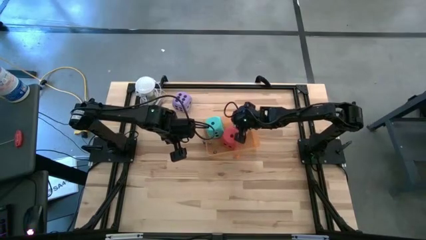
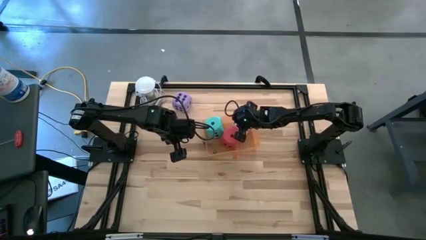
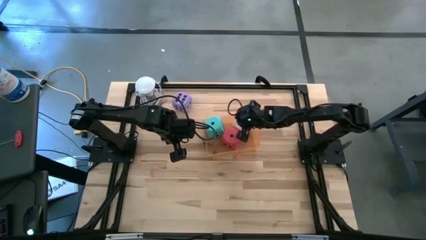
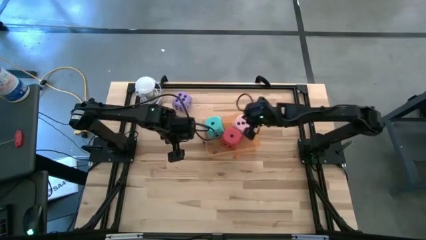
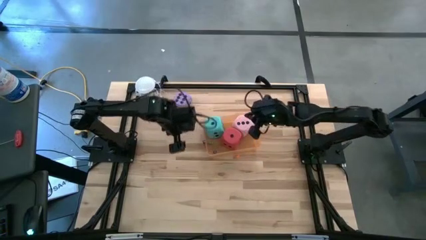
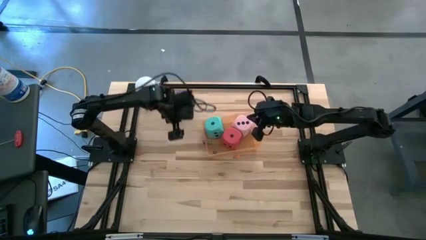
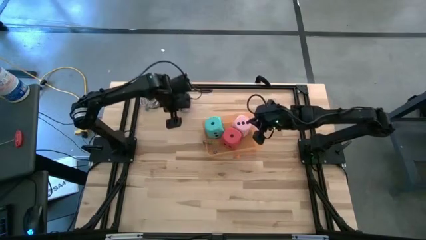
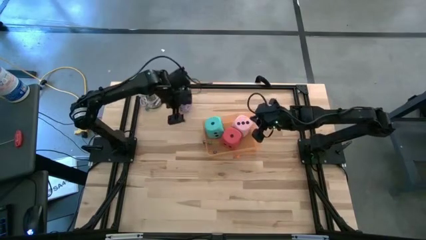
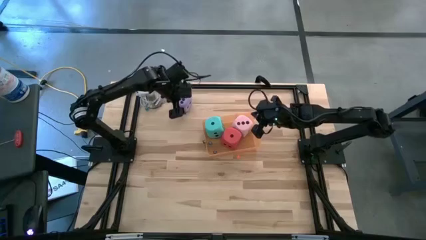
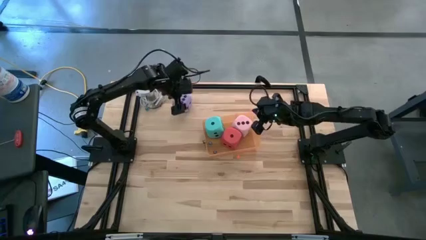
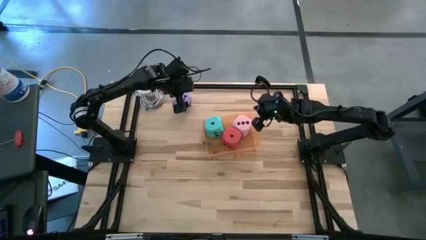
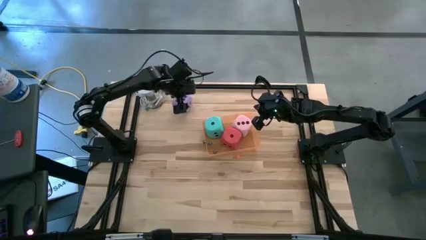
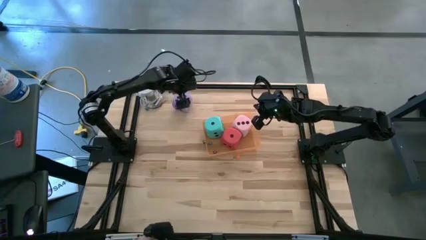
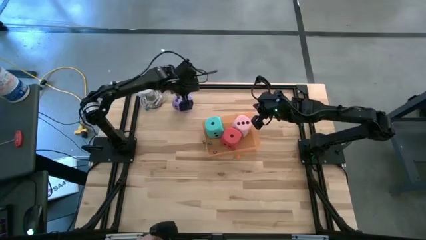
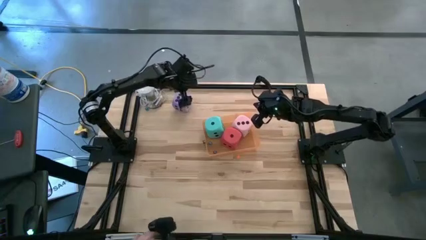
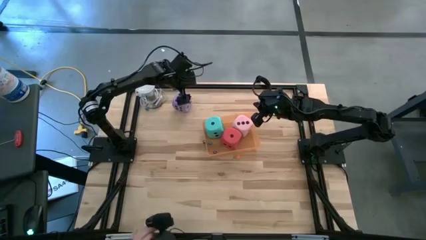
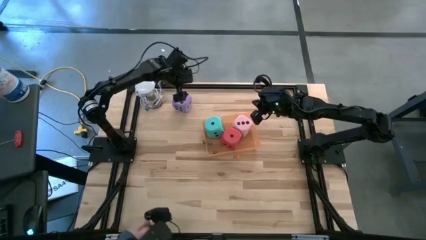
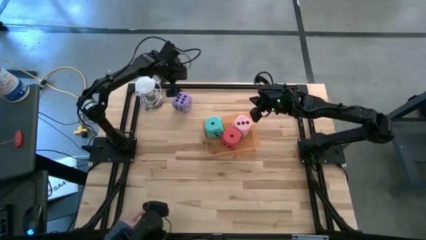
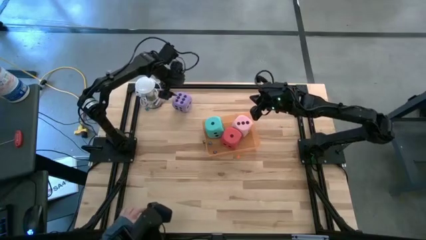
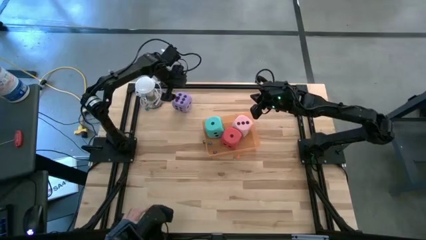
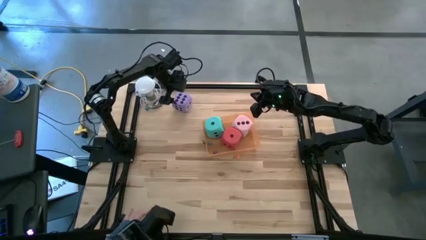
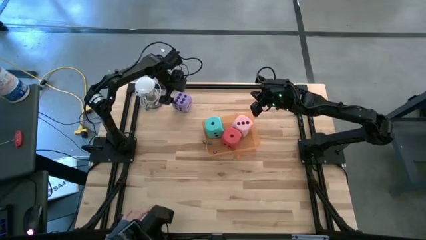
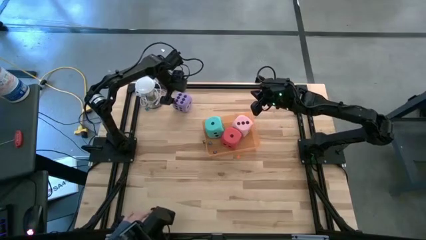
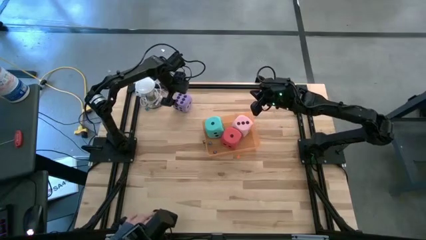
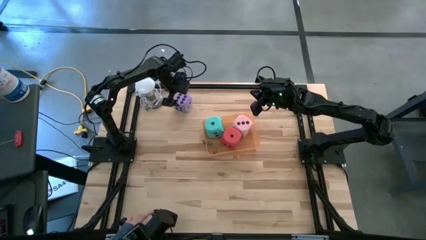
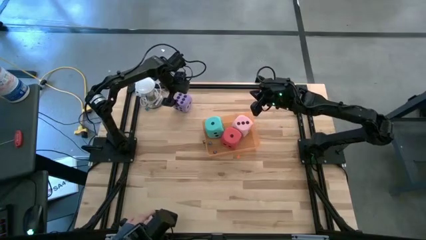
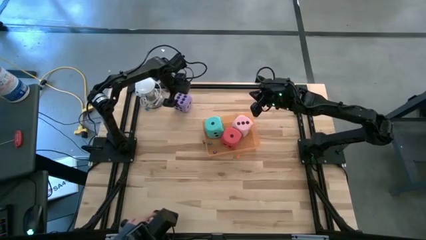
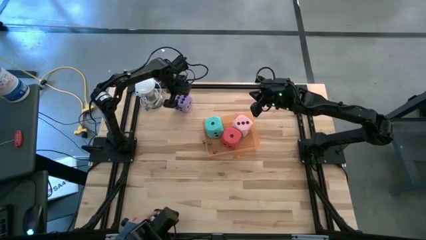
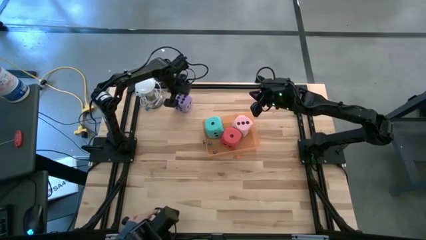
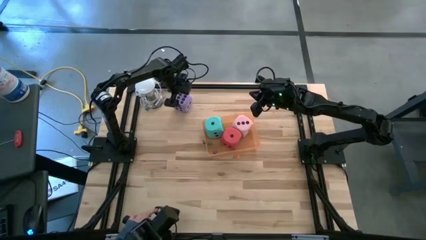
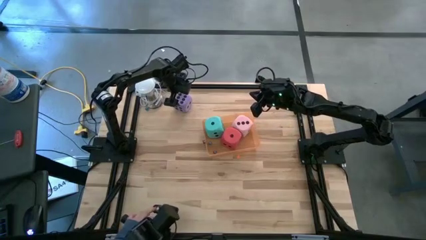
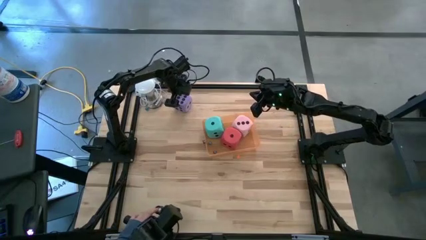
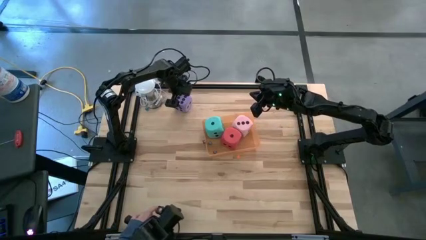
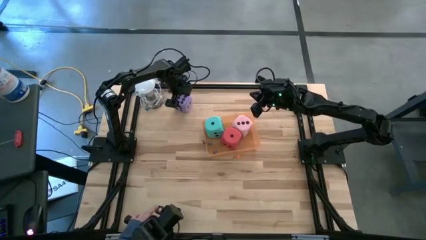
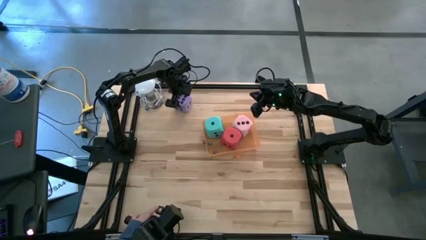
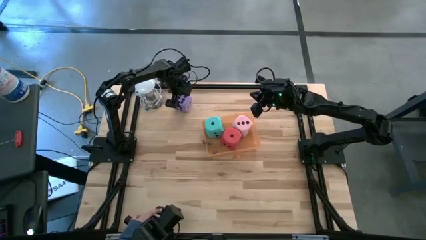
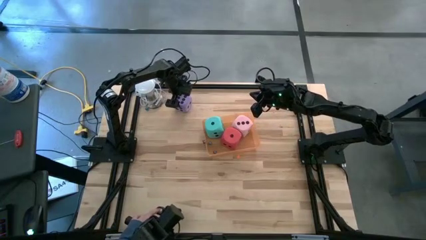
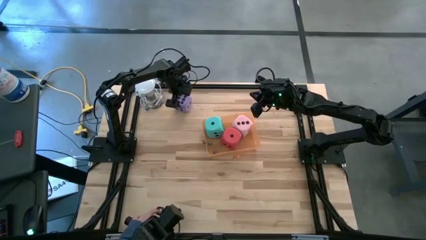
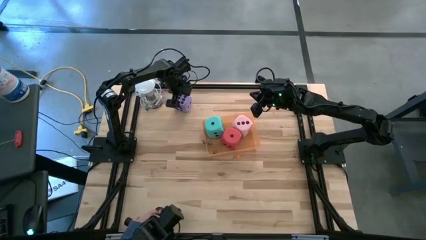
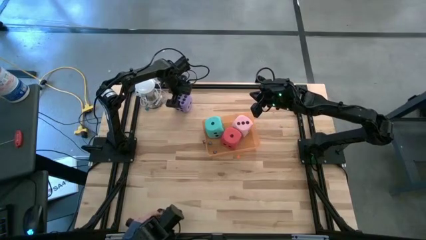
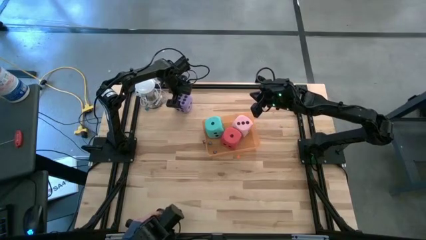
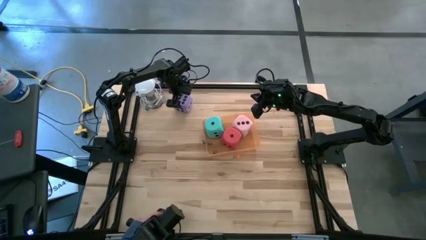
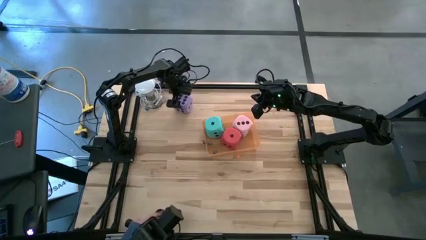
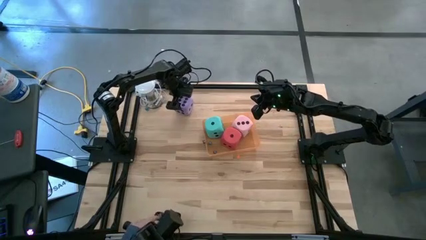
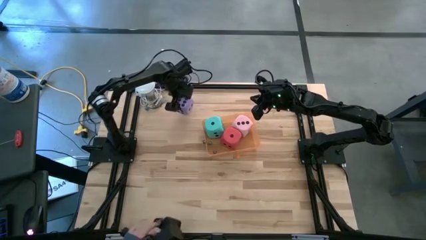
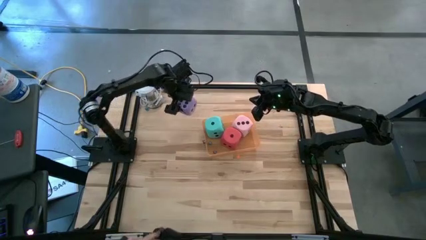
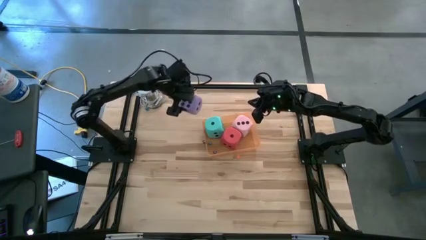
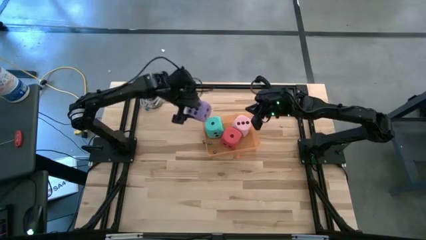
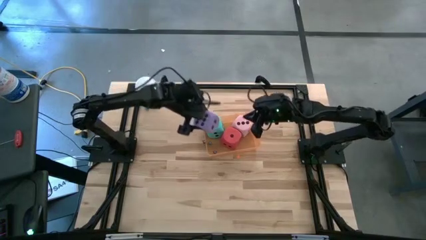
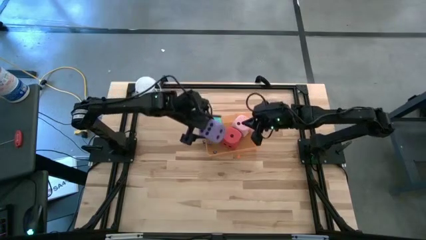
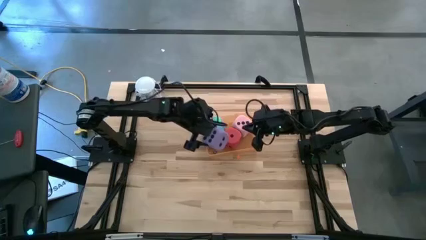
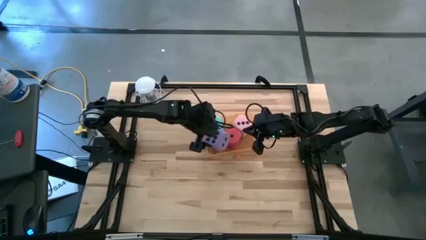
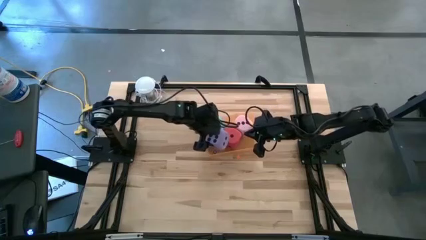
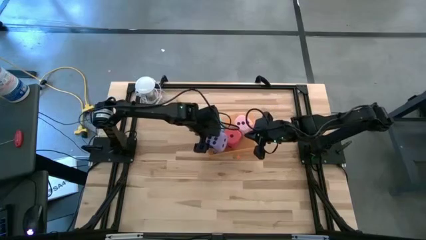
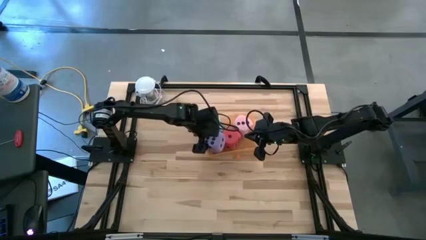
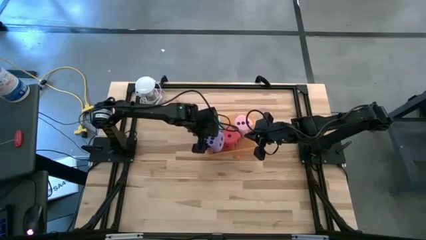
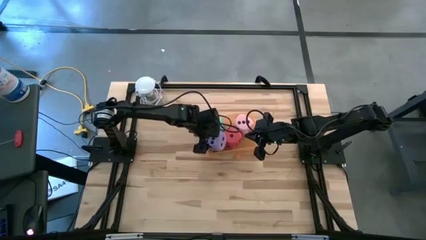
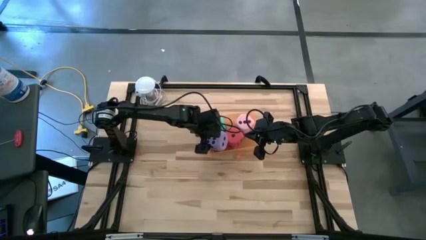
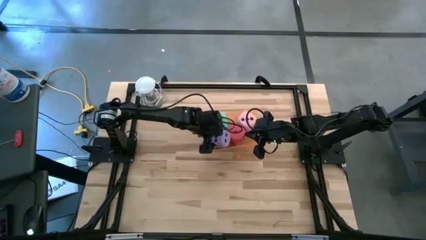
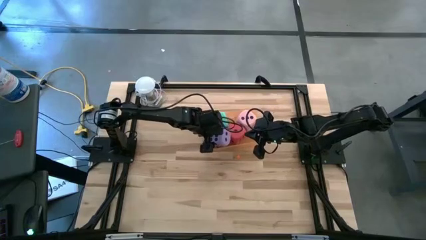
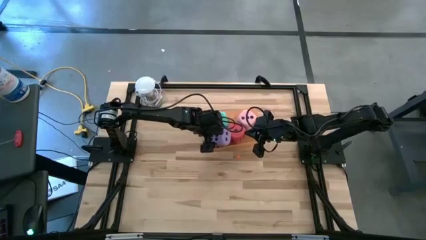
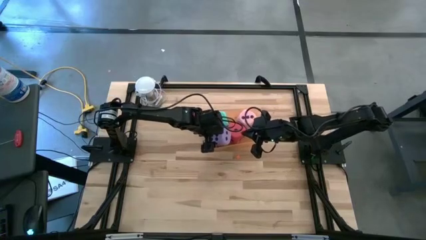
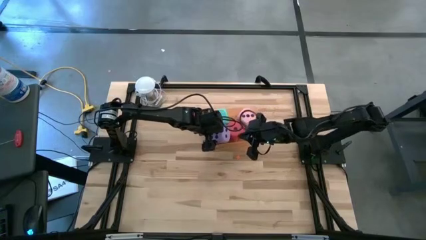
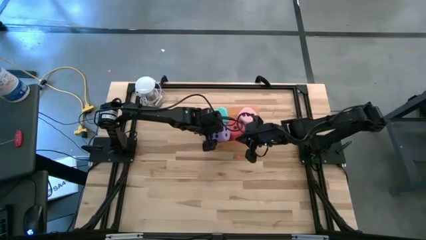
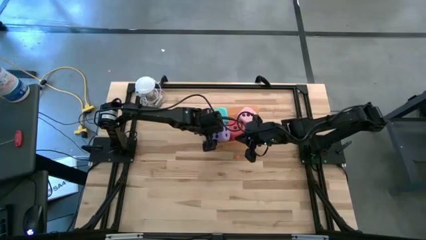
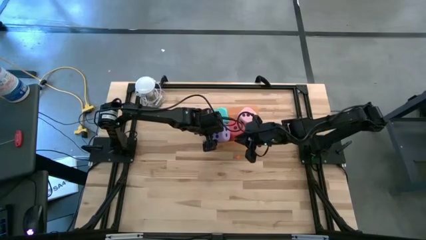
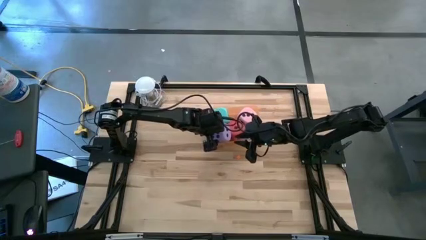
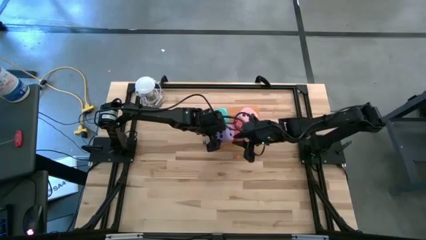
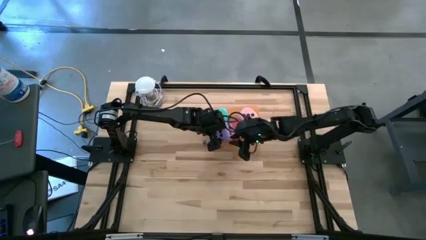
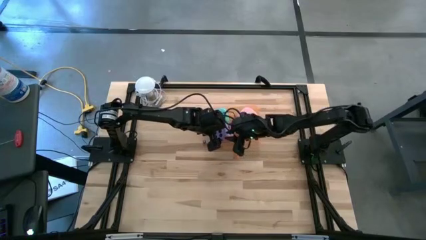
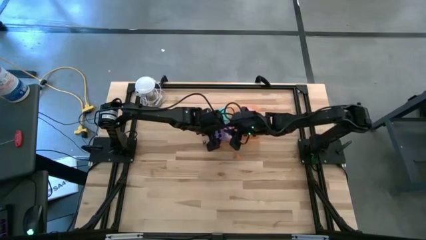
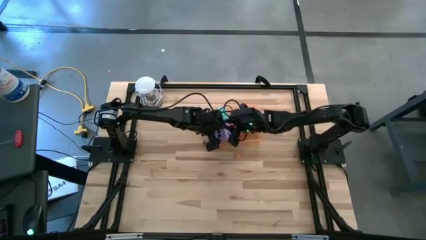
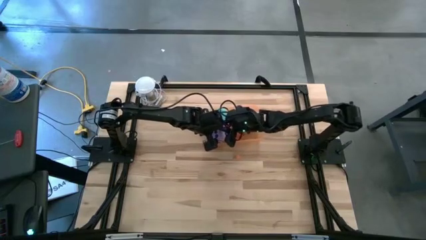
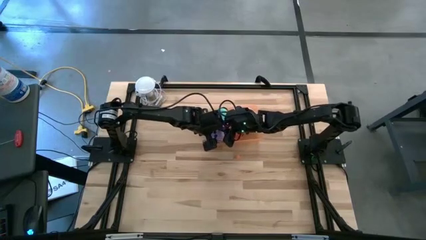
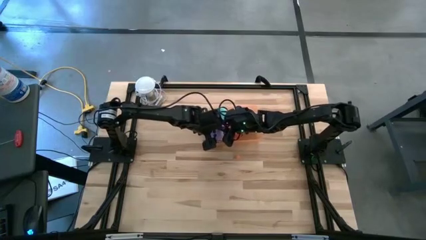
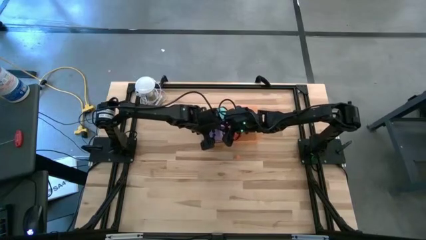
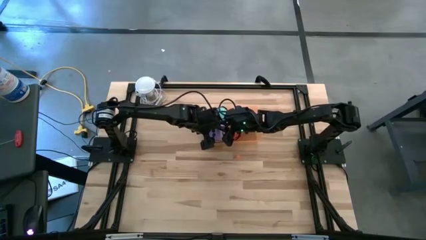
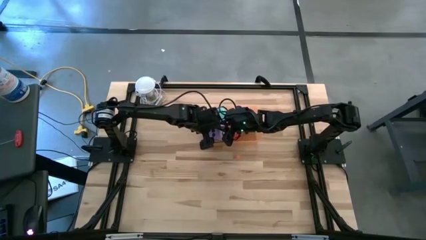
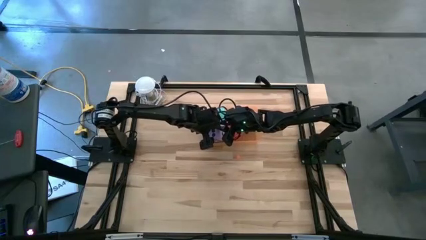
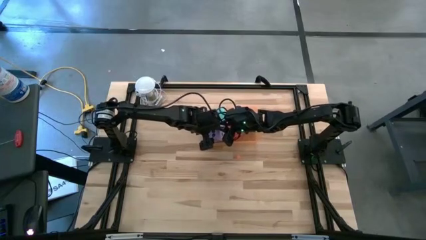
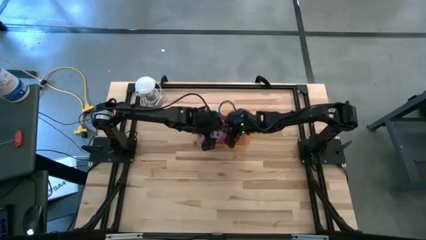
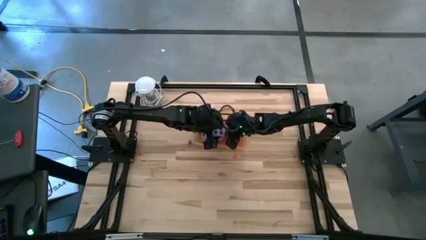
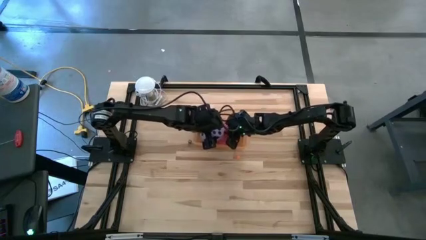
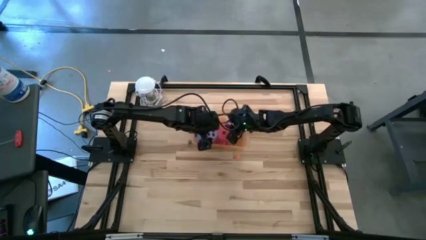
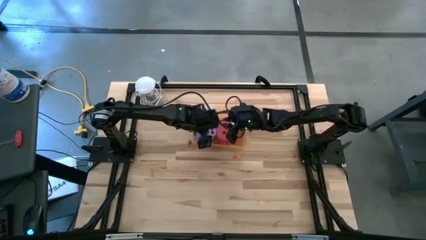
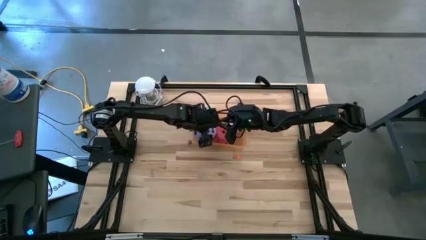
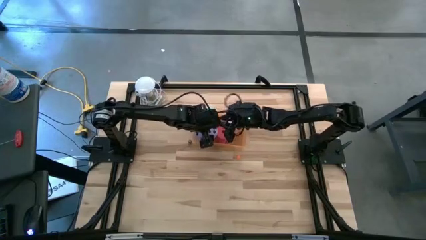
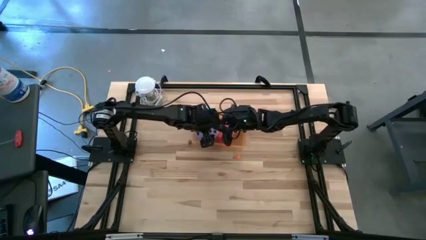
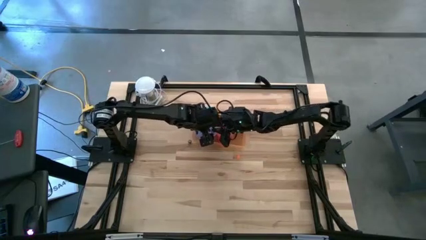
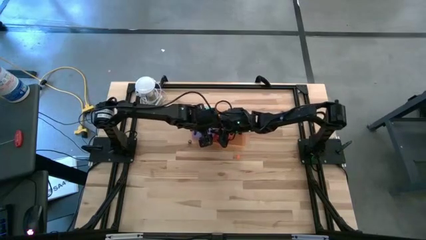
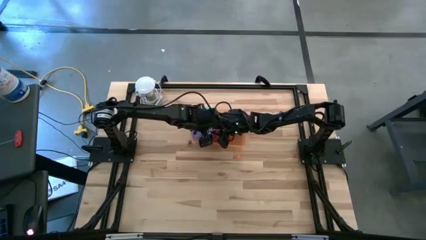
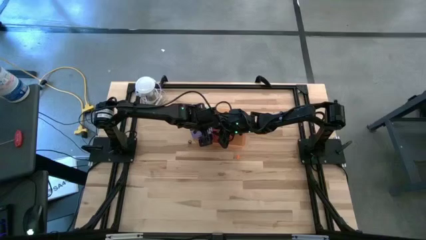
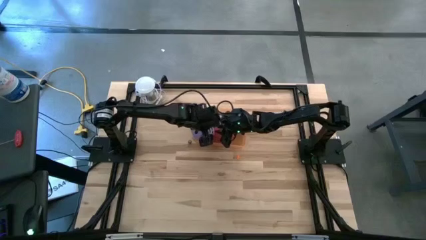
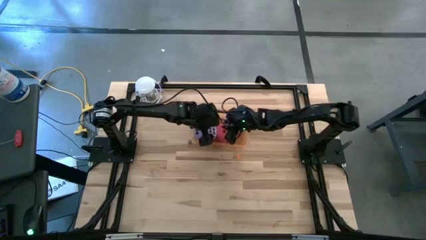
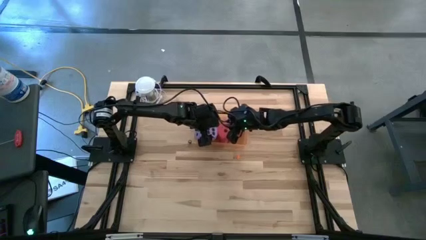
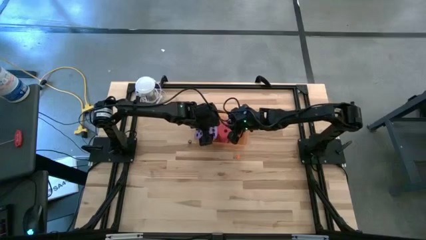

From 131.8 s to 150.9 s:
Task: Pick & Place Dice
Put the large purple dice into the orange bin
